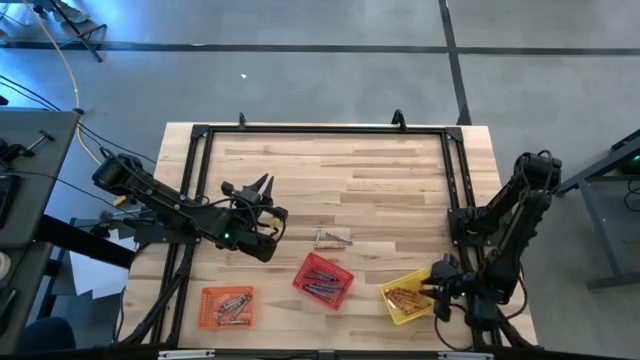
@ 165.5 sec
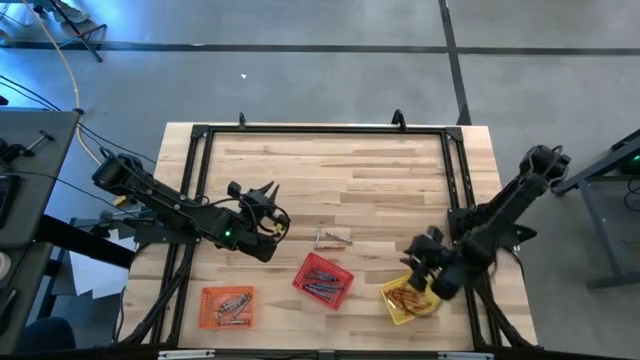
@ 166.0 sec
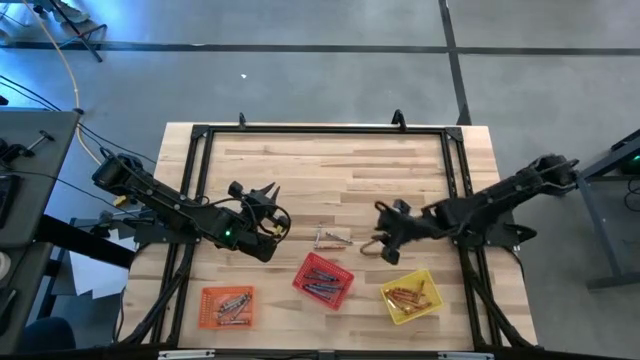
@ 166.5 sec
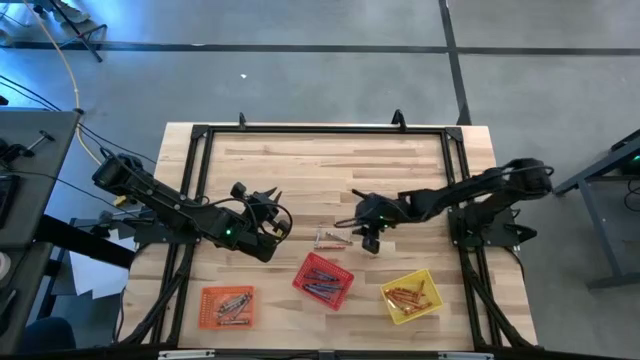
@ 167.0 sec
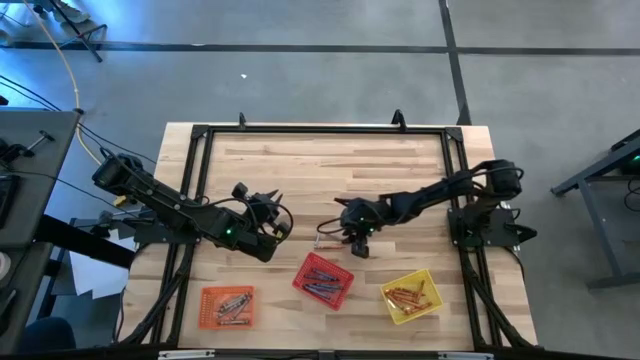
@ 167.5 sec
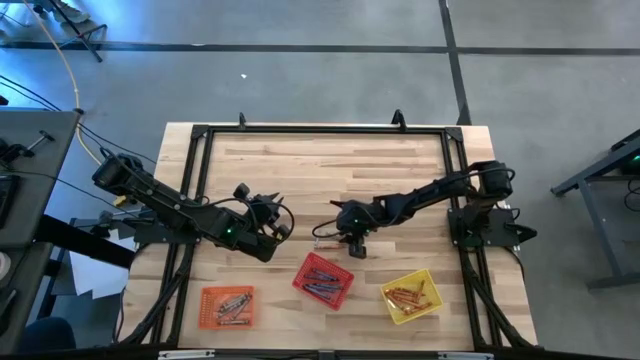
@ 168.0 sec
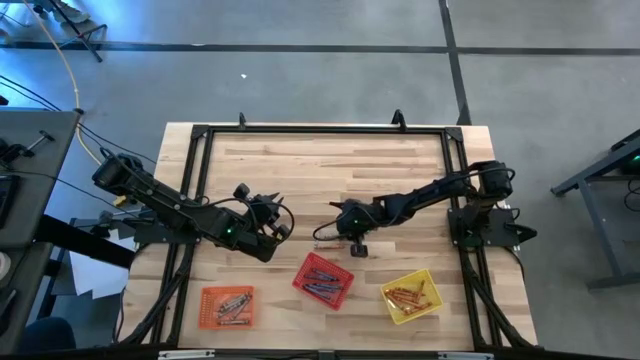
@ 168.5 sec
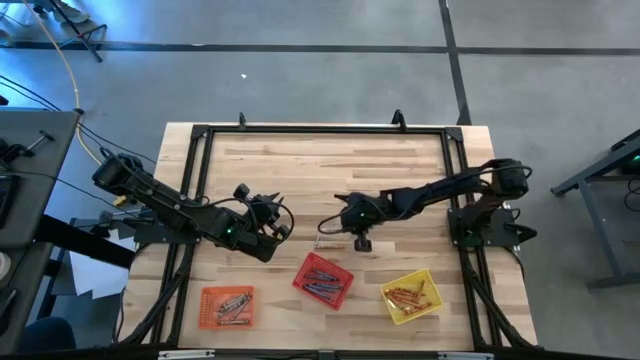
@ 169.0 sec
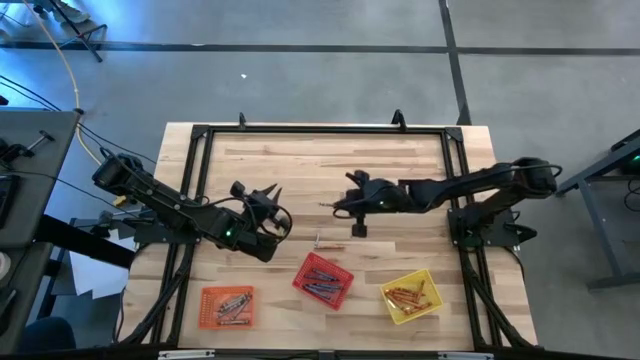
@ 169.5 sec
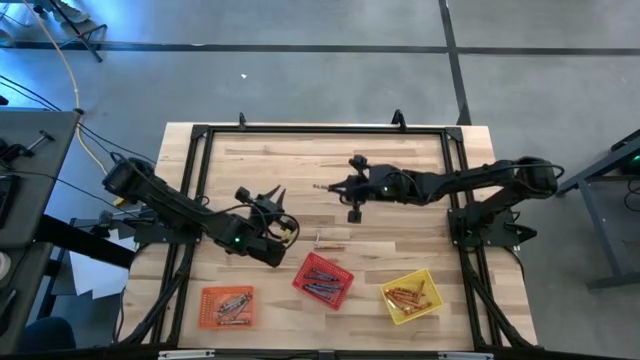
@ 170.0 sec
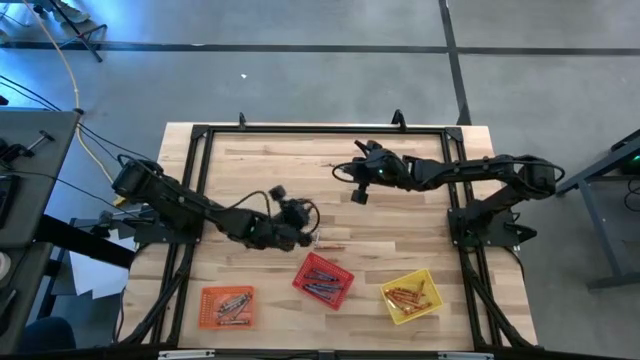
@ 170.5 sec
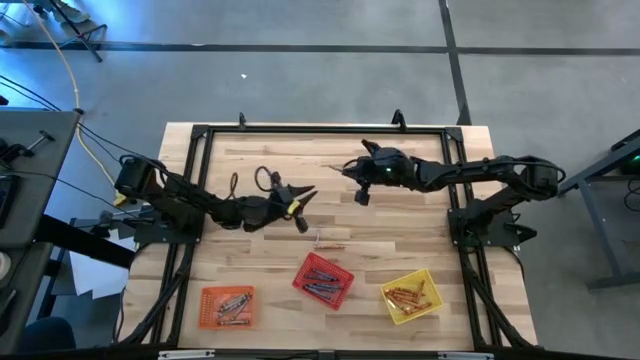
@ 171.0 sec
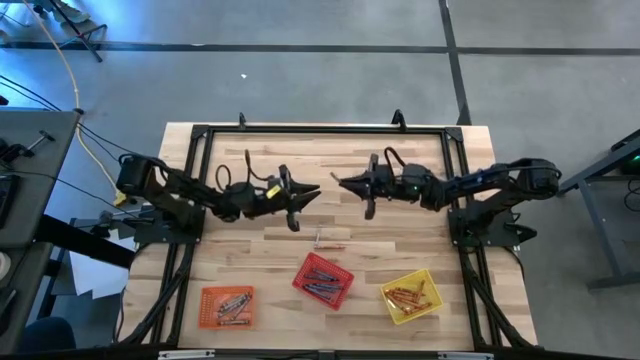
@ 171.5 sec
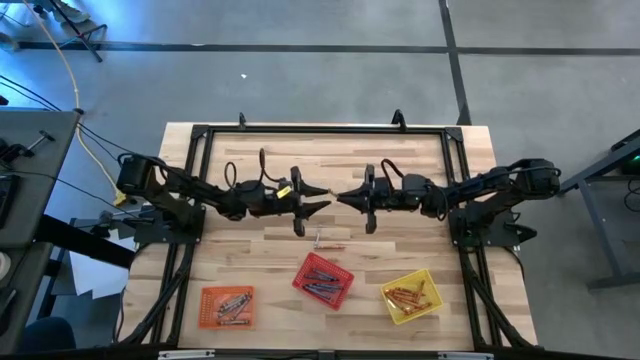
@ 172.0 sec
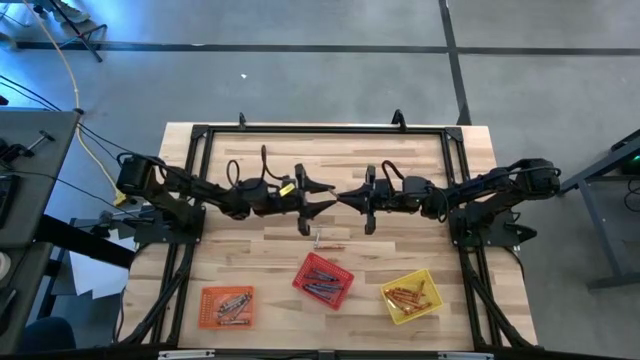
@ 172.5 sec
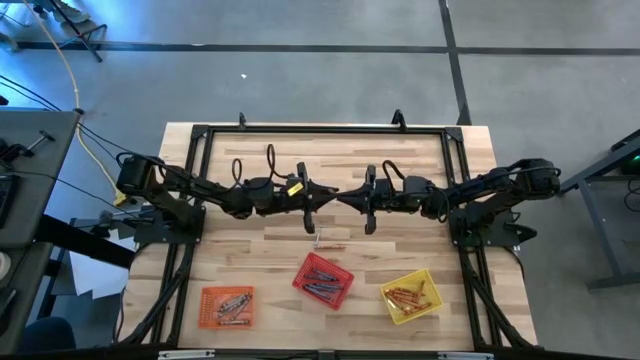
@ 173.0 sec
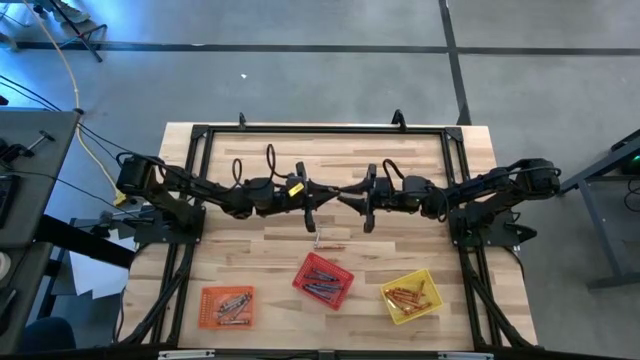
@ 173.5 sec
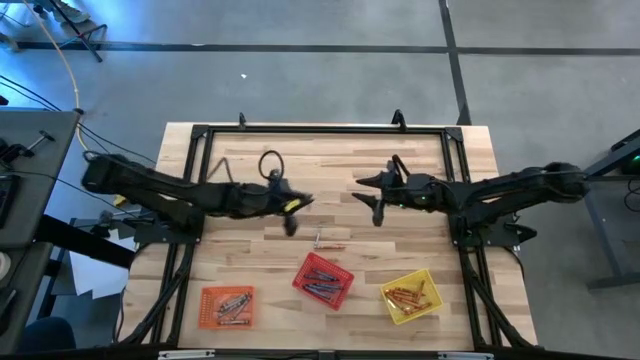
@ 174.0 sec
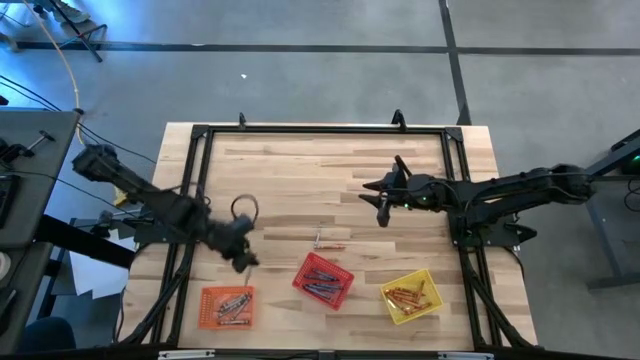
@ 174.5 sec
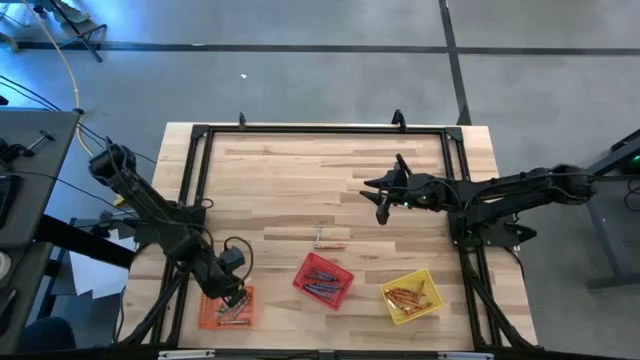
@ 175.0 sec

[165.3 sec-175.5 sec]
Task: Sort crayons
Put the gray crayon into the orange bin

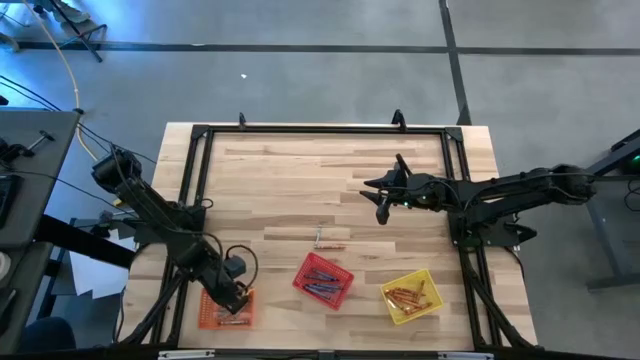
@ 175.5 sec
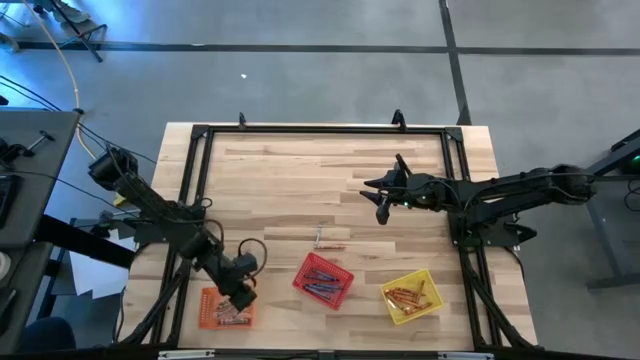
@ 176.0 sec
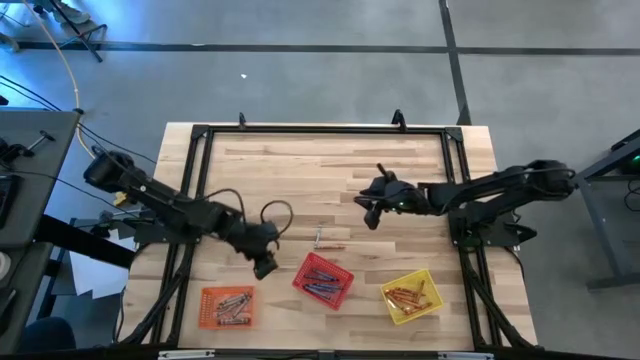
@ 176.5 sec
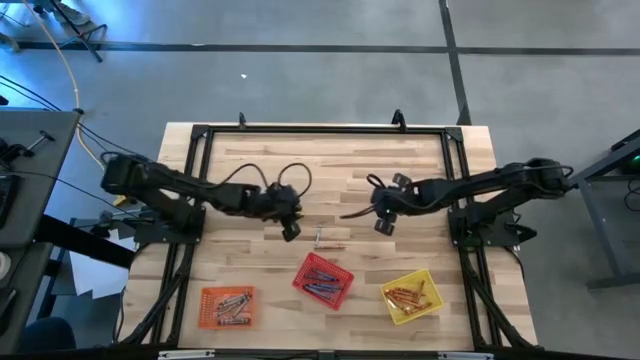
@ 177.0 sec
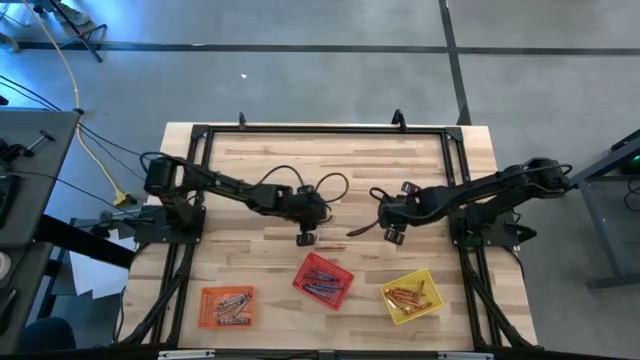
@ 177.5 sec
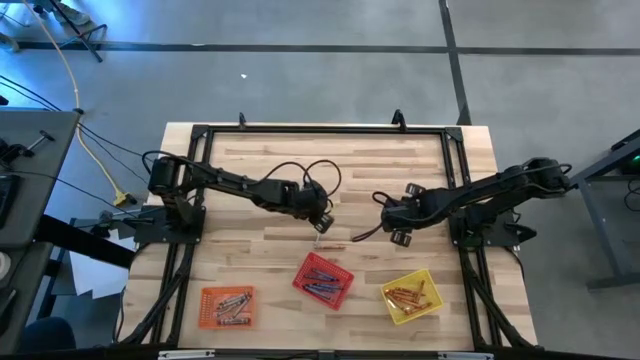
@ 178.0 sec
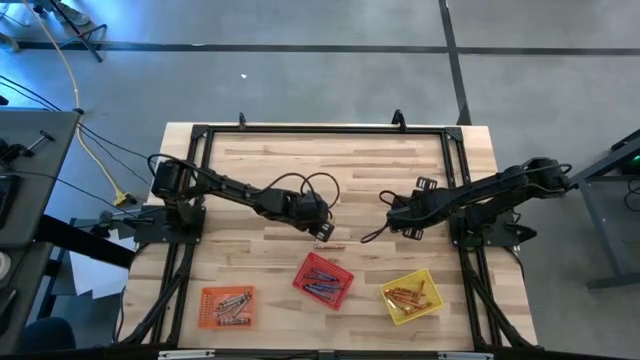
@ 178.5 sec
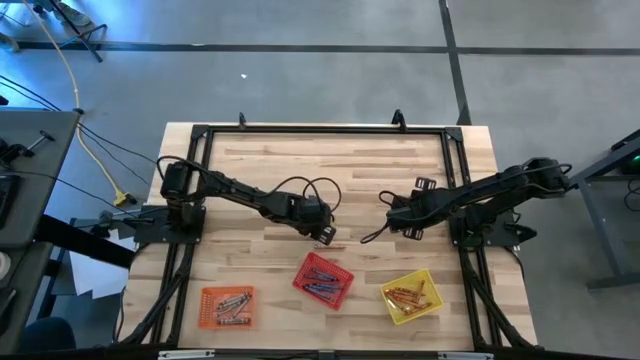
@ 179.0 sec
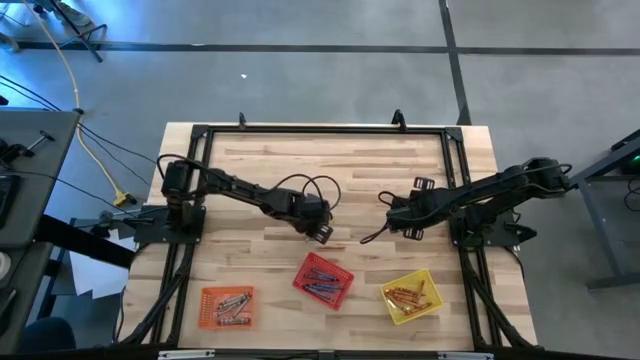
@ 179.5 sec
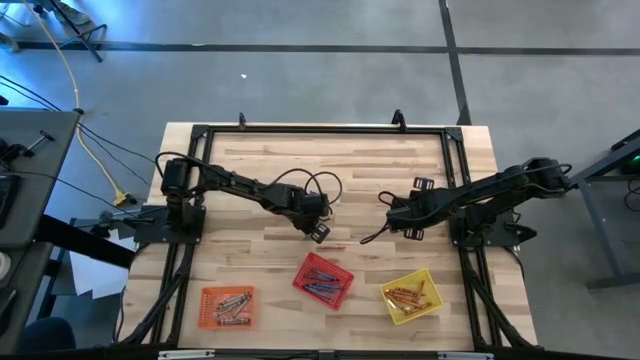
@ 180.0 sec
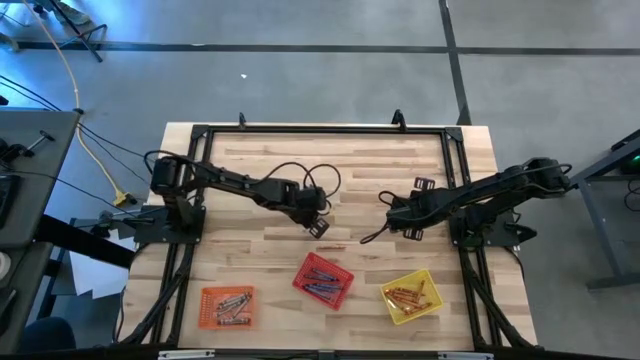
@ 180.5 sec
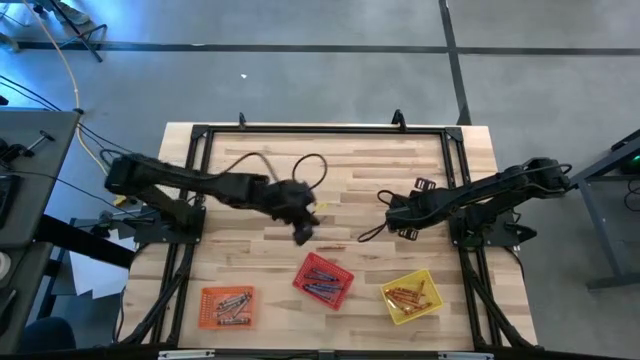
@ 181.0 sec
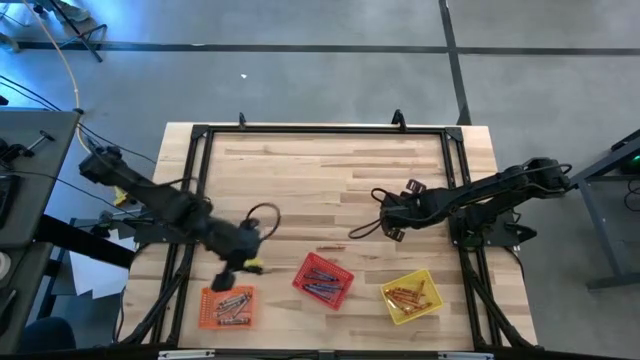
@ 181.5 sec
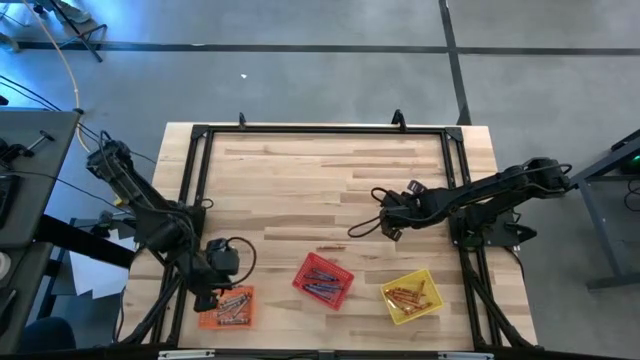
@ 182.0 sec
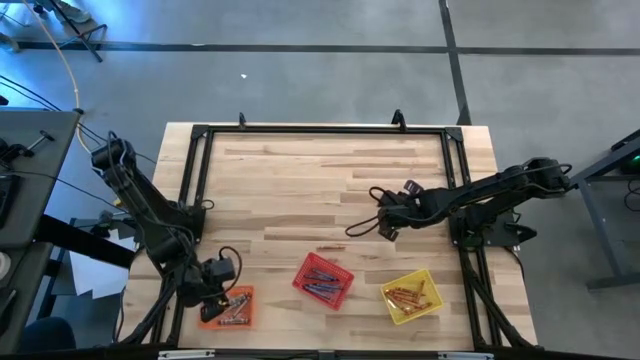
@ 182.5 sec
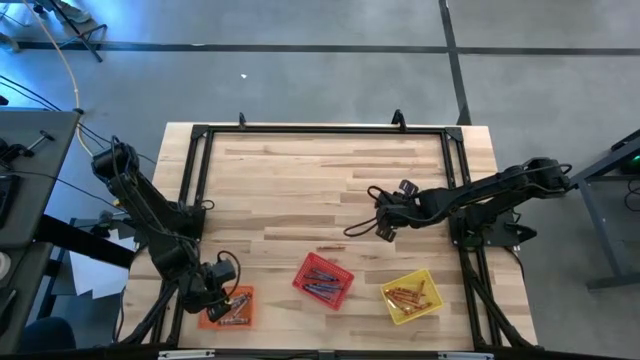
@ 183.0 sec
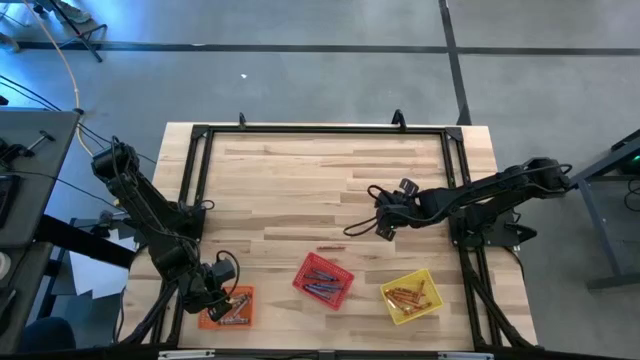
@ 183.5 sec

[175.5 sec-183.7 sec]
Put the gray crayon into the orange bin
